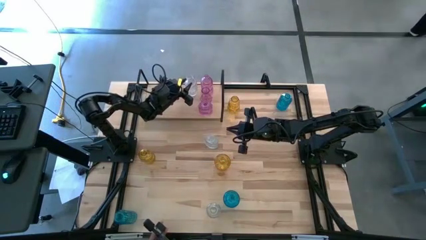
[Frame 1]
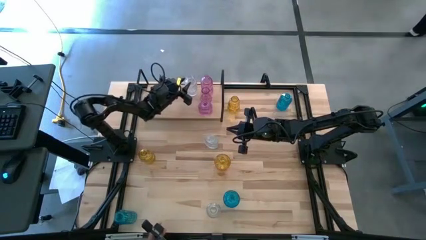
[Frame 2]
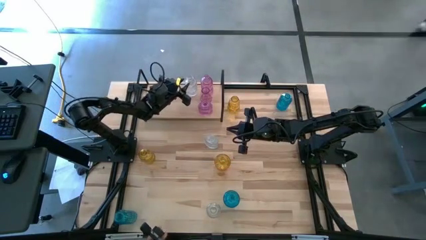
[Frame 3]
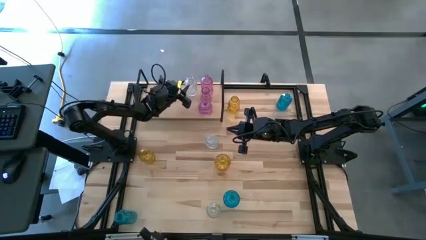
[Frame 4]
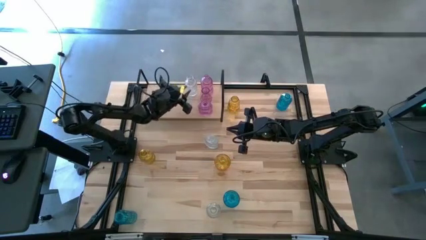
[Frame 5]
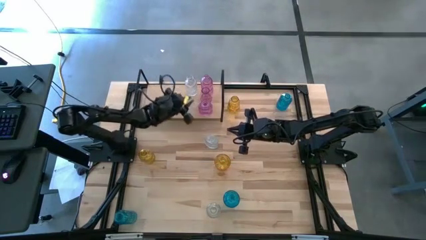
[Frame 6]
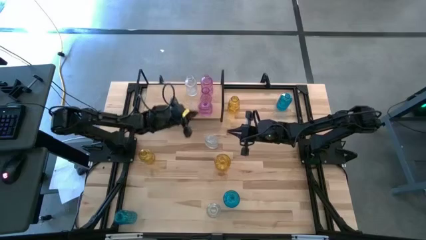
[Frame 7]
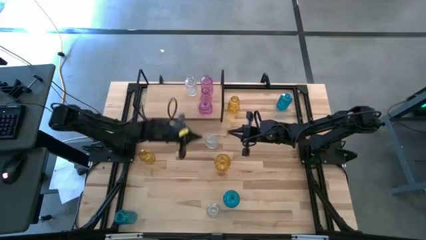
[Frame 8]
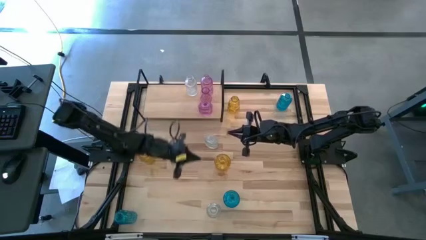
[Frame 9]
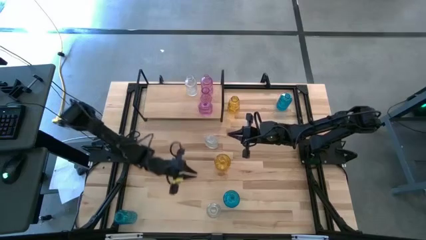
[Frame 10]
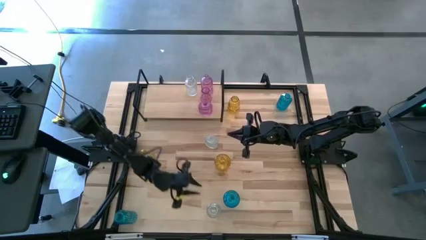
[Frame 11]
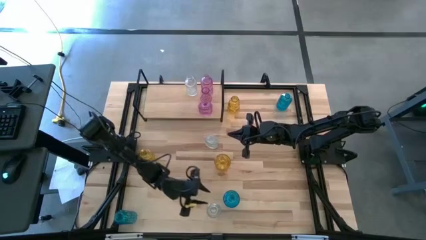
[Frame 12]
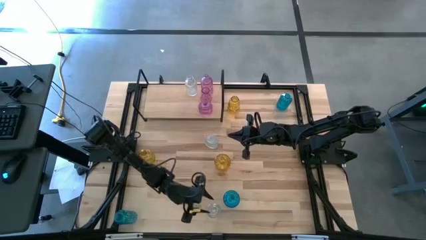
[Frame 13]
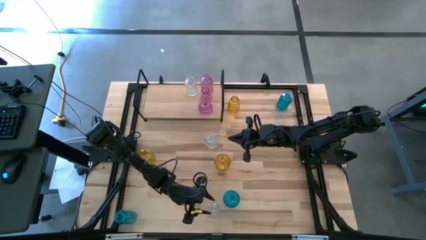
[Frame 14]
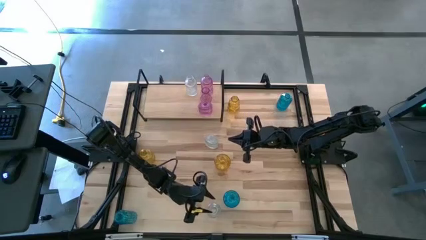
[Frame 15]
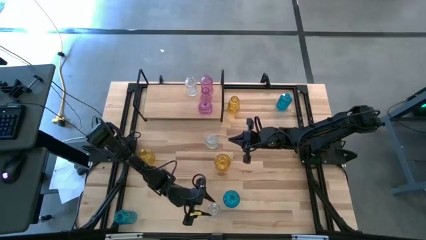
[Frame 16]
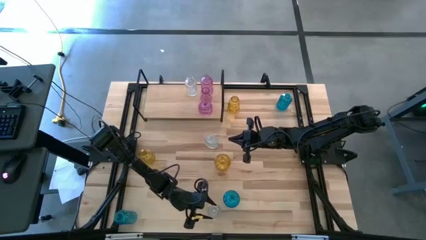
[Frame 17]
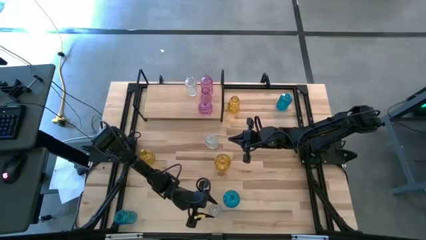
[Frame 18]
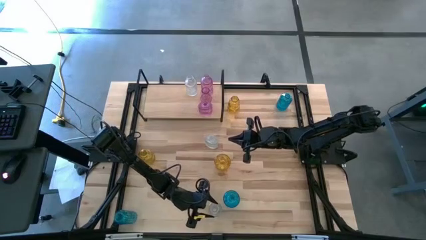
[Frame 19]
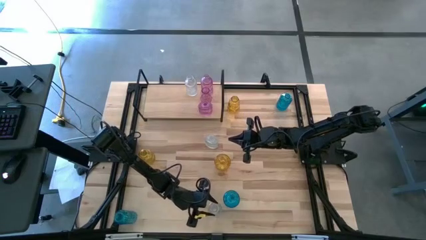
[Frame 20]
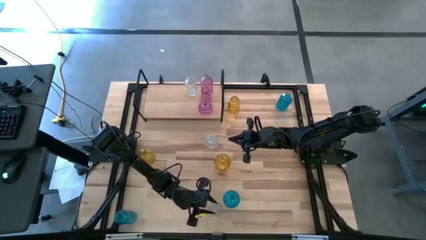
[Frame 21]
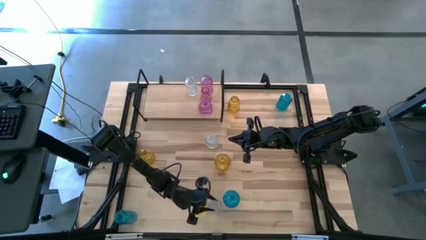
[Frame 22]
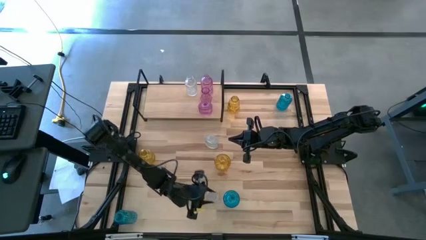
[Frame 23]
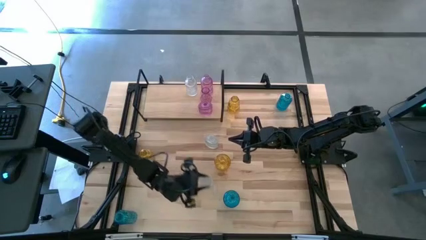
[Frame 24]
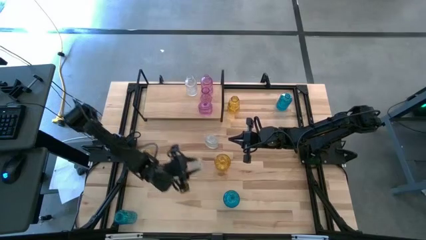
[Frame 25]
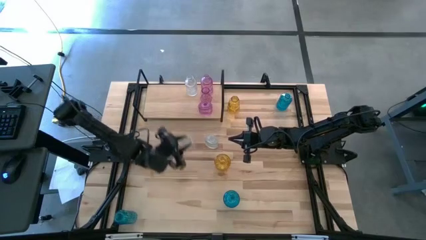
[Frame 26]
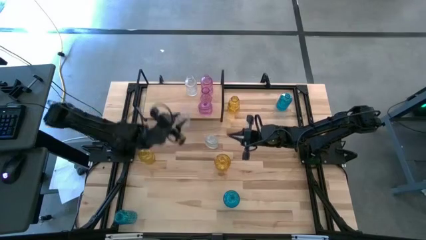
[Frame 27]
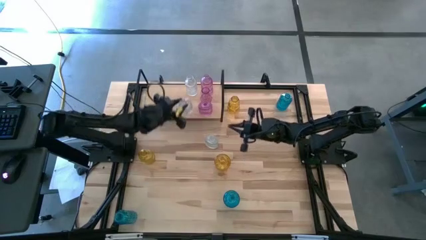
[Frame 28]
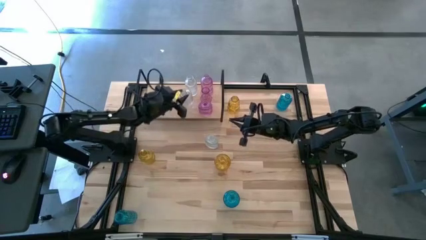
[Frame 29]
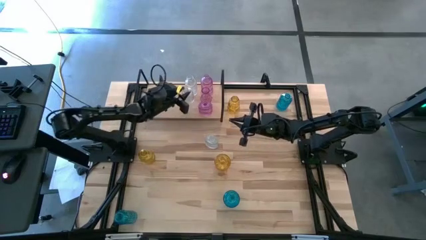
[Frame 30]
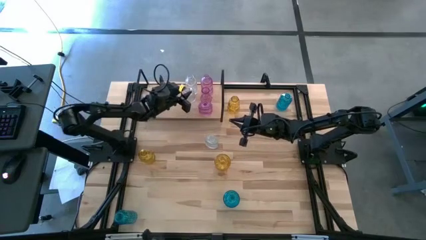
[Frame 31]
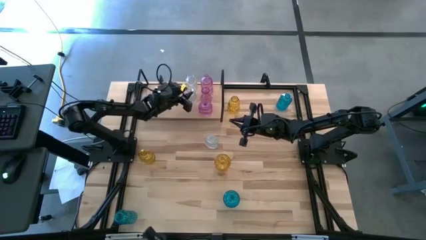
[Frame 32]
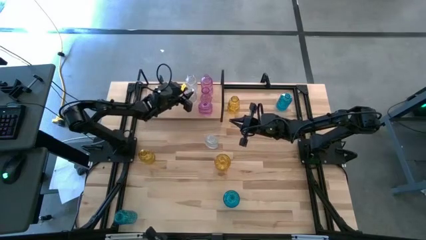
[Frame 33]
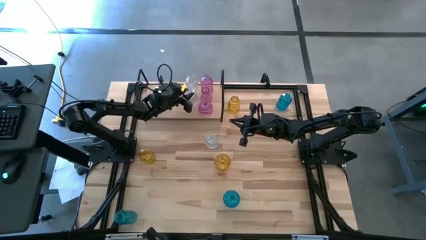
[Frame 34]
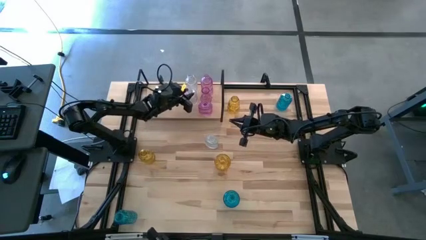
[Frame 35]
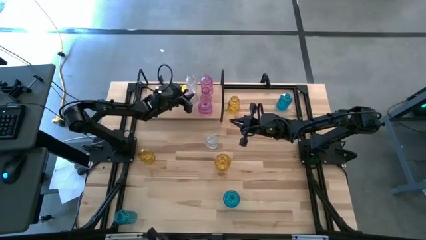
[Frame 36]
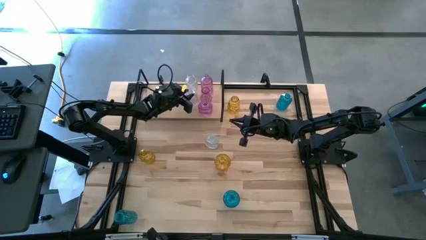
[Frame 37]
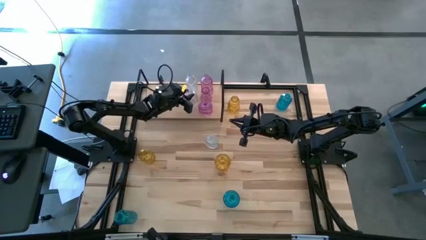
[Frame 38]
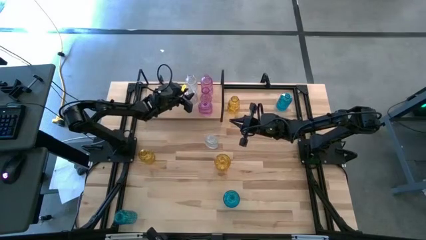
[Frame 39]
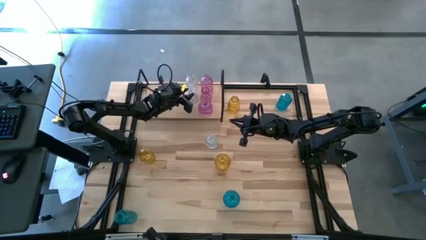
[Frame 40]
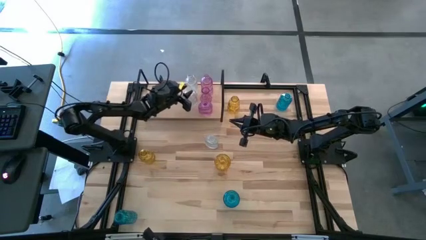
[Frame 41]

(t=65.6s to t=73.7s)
Task: sort vases onto shelf
Put the bottom transparent vase on the shelf

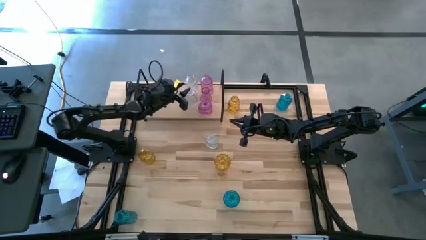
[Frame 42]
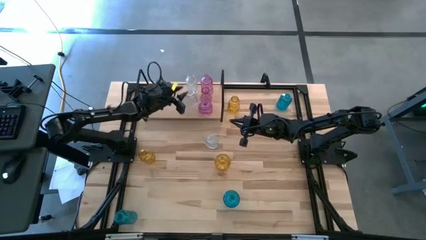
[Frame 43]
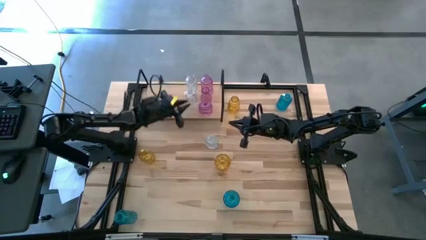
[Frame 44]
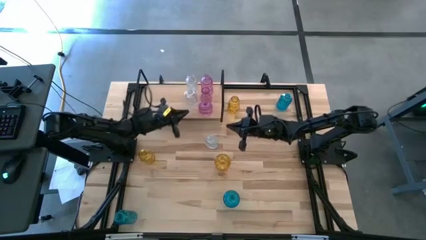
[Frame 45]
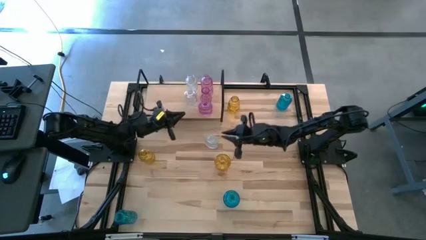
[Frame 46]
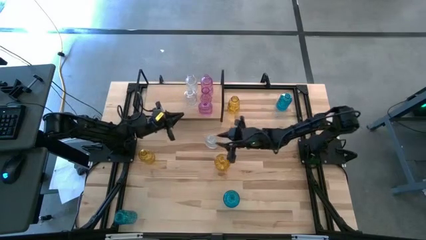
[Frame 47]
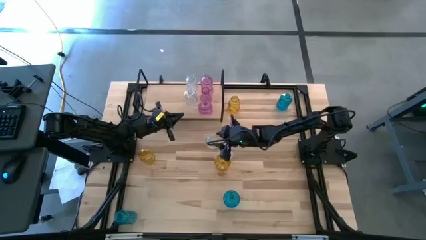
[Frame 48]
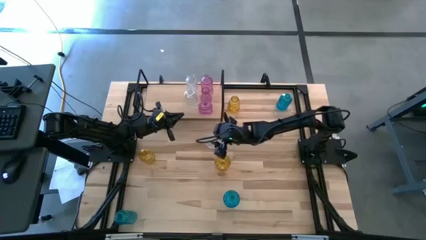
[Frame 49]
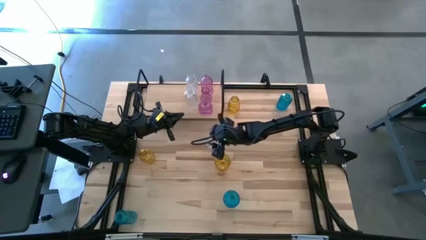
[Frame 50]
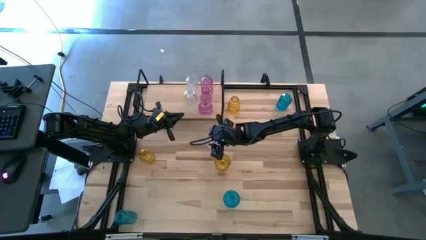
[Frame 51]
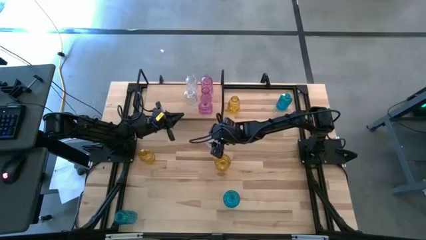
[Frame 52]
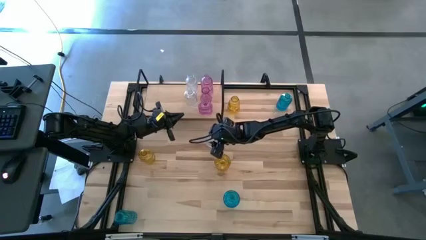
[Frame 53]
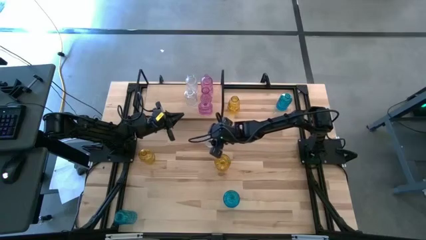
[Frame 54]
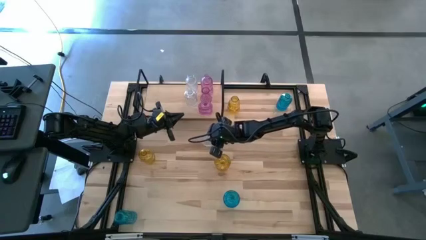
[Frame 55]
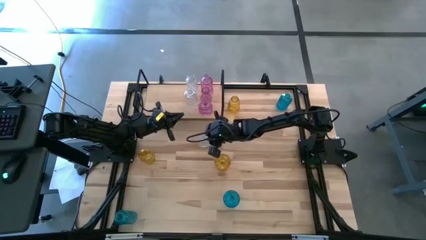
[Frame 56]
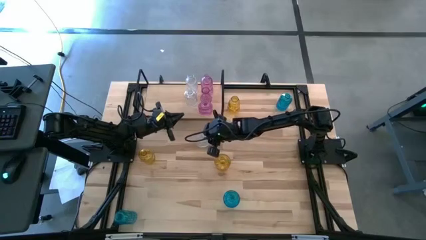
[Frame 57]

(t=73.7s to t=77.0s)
Put the transparent vase on the shelf

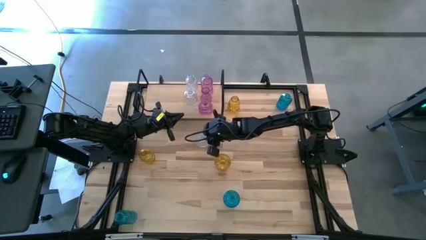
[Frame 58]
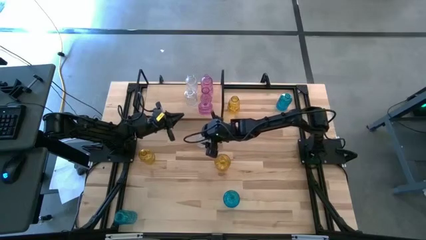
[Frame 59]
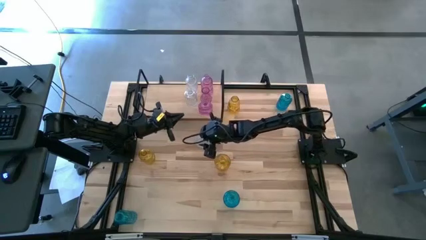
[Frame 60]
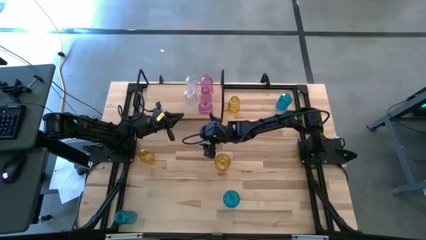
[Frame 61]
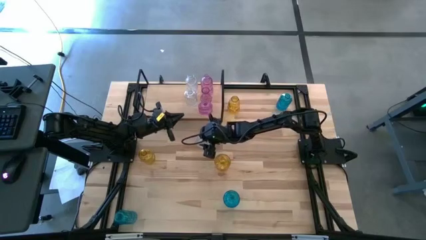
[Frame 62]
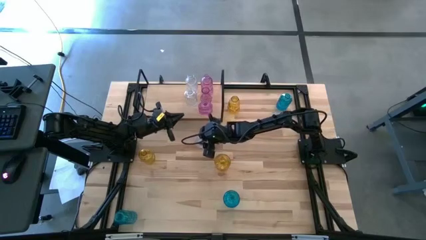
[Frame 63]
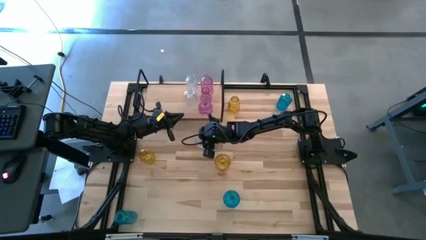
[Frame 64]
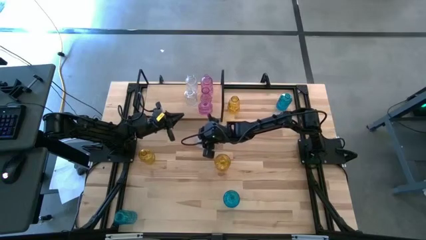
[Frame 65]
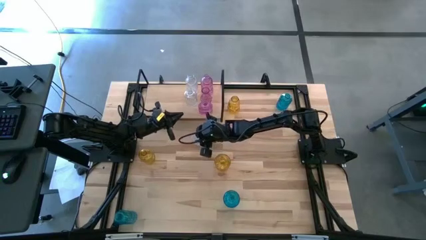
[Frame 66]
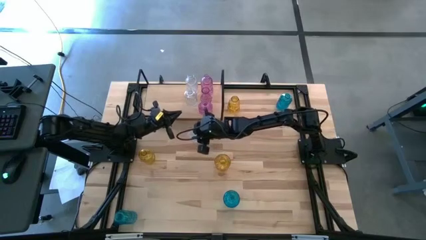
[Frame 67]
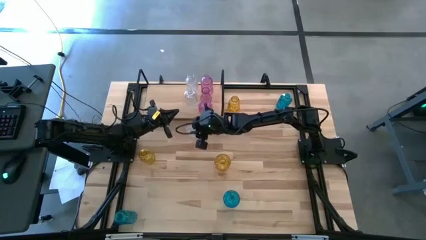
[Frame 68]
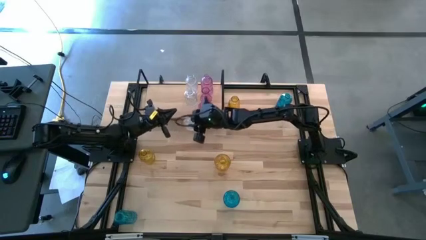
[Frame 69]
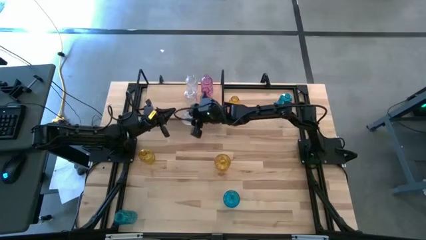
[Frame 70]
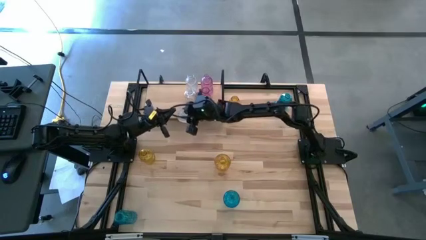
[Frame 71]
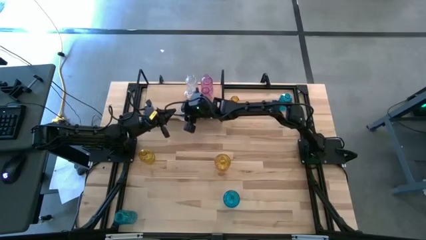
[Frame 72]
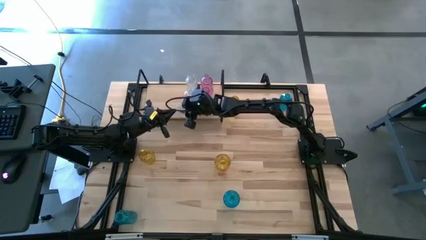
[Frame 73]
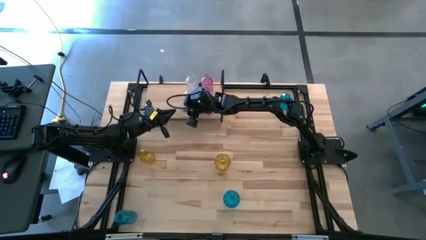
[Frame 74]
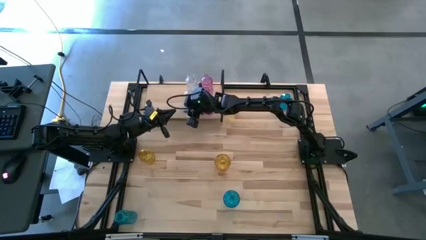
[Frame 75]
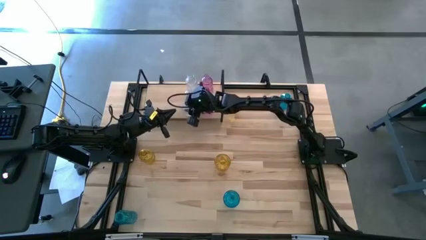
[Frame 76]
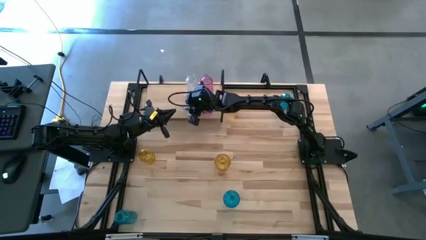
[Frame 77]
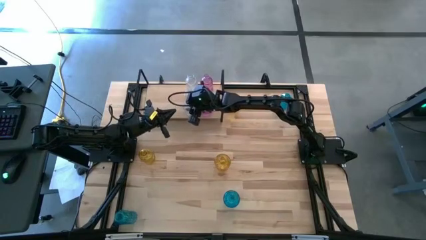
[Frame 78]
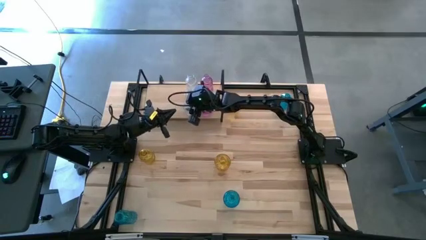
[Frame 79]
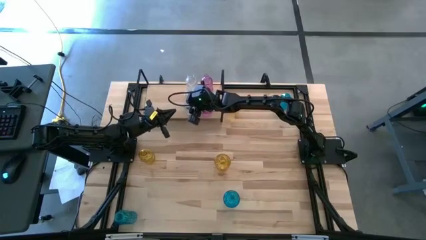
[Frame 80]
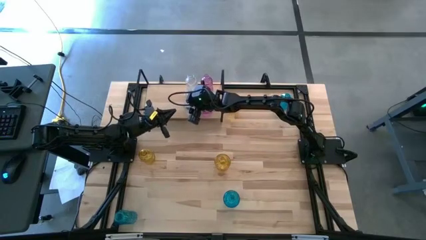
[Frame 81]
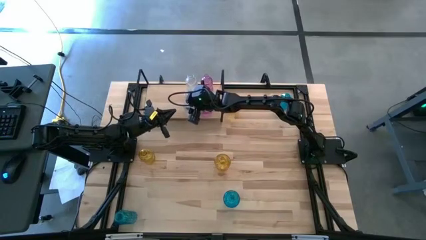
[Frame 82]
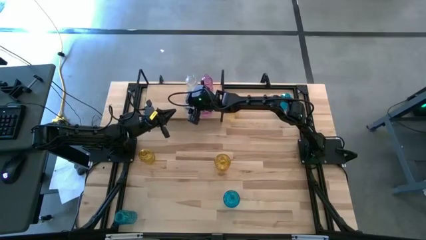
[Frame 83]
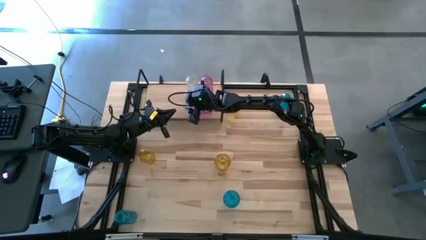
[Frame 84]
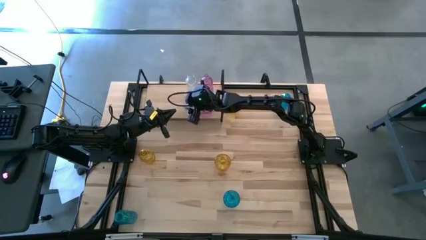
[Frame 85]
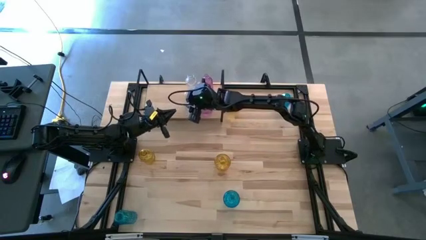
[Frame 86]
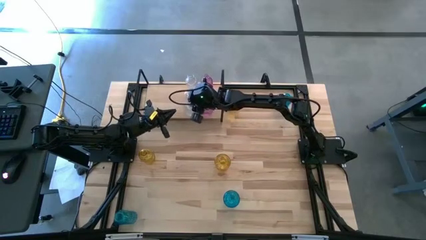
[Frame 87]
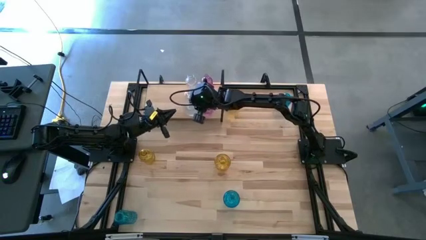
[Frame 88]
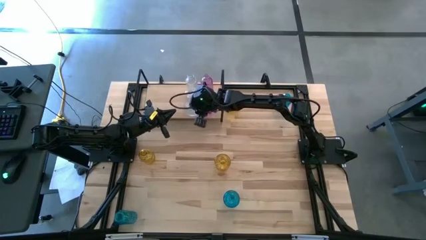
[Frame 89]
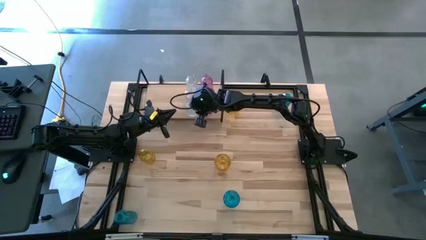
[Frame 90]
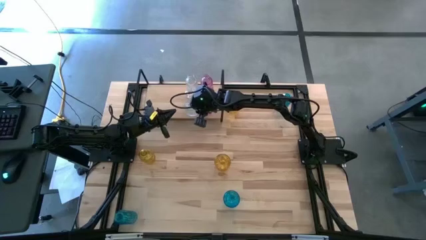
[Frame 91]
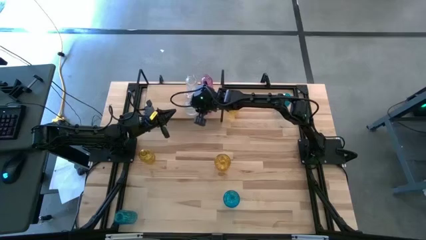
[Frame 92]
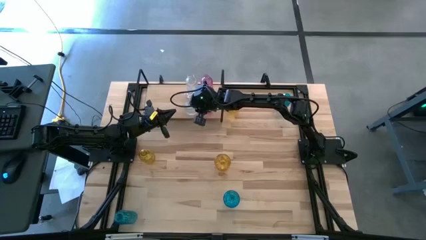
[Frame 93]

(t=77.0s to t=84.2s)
Put the transparent vase on the shelf
